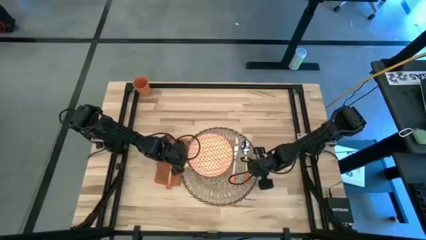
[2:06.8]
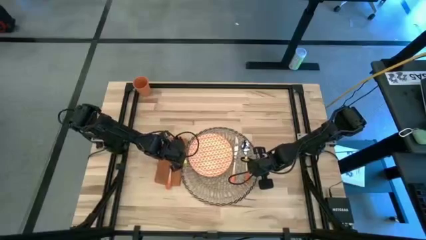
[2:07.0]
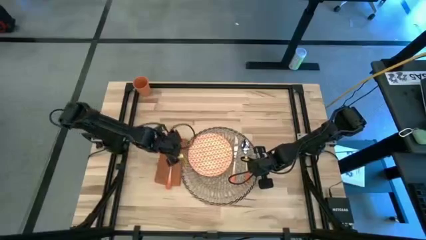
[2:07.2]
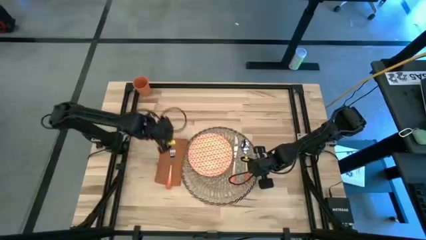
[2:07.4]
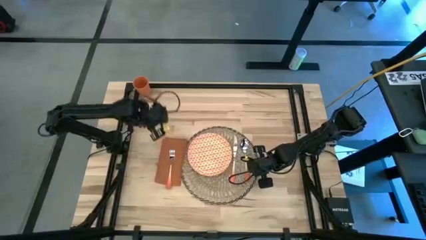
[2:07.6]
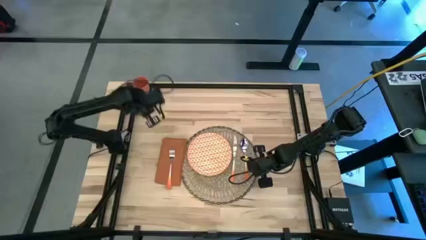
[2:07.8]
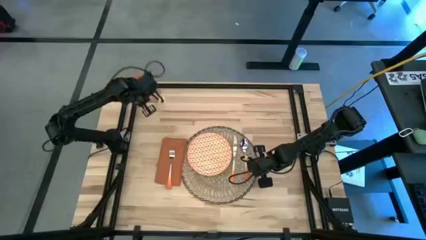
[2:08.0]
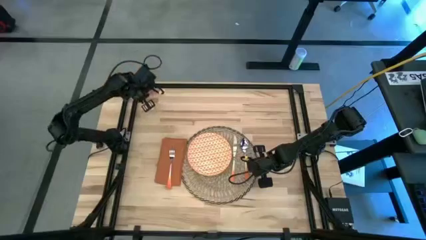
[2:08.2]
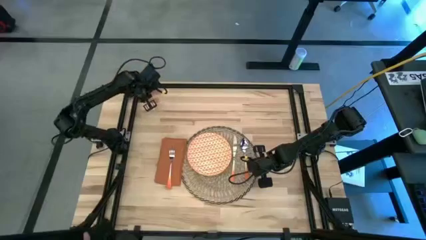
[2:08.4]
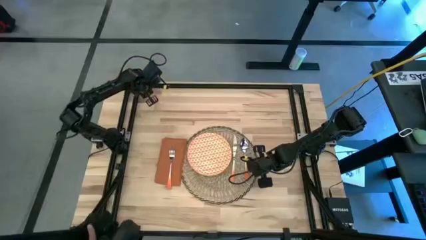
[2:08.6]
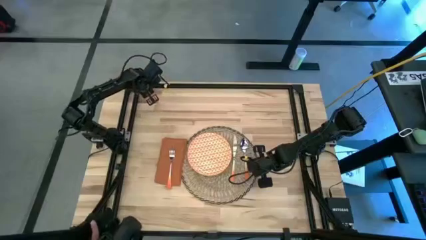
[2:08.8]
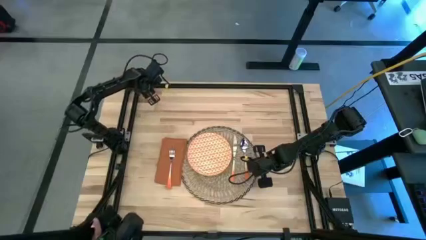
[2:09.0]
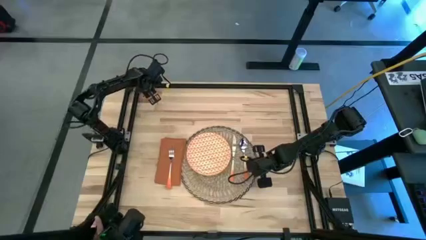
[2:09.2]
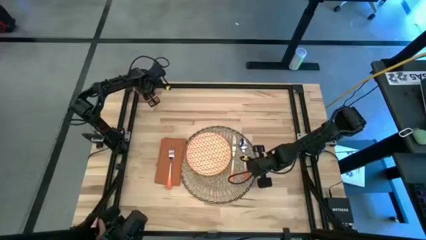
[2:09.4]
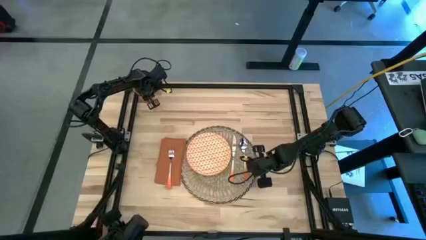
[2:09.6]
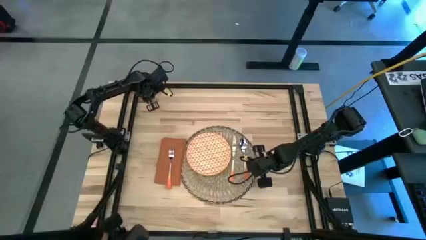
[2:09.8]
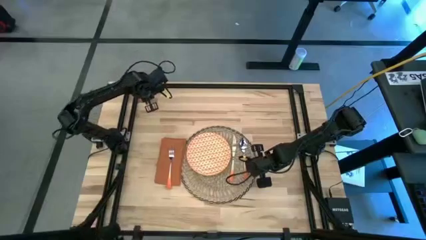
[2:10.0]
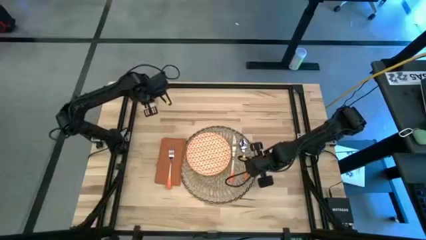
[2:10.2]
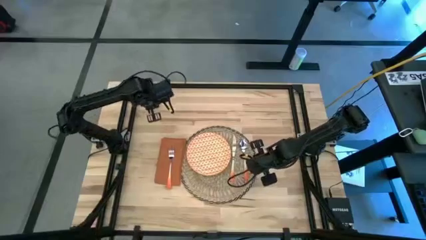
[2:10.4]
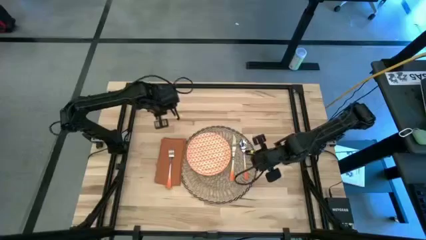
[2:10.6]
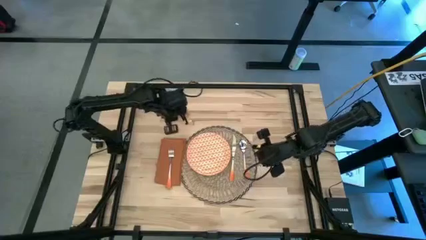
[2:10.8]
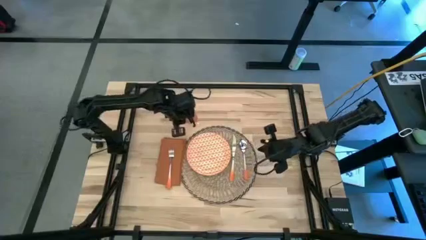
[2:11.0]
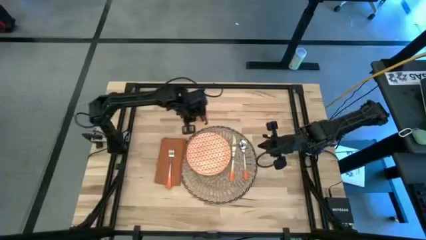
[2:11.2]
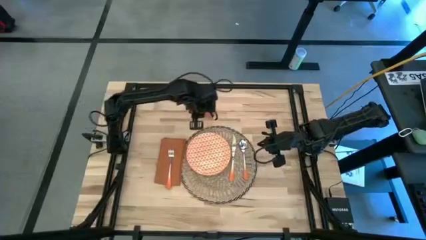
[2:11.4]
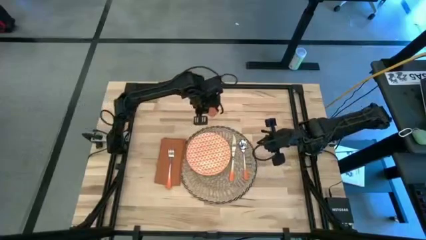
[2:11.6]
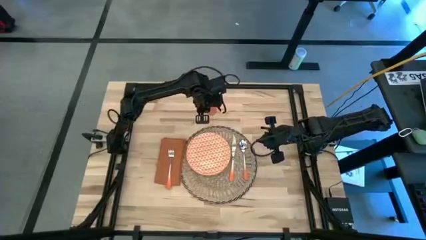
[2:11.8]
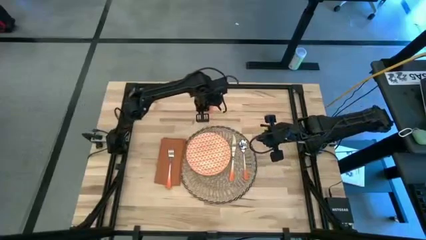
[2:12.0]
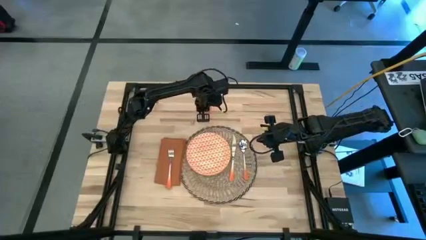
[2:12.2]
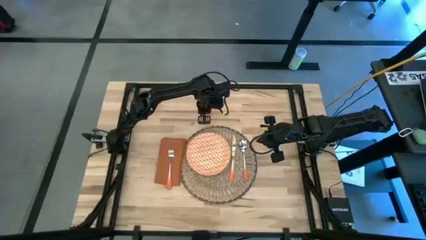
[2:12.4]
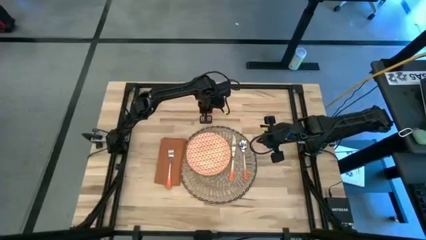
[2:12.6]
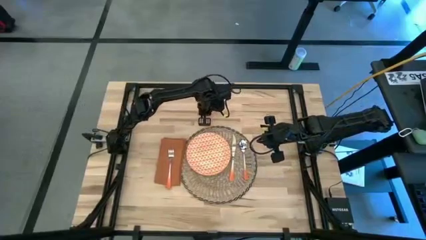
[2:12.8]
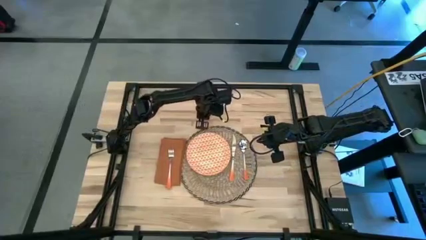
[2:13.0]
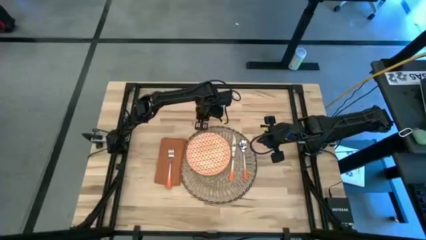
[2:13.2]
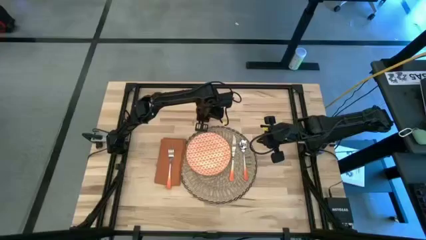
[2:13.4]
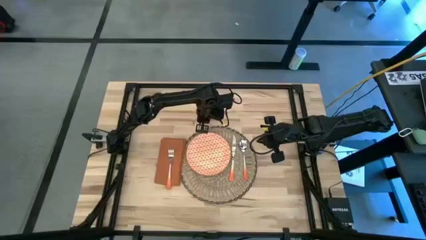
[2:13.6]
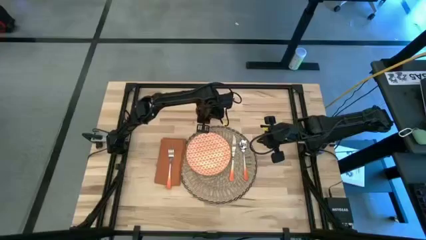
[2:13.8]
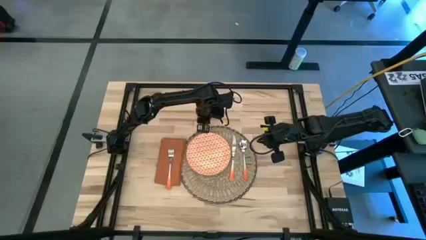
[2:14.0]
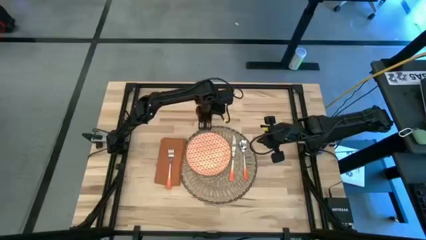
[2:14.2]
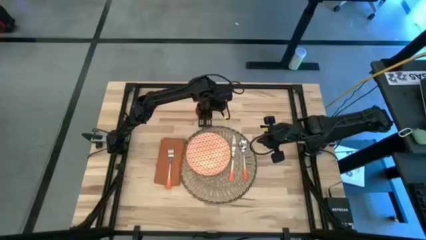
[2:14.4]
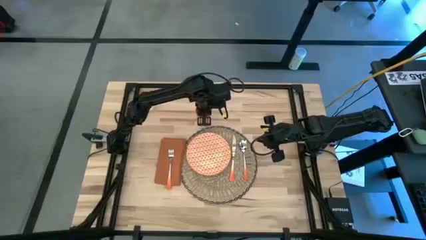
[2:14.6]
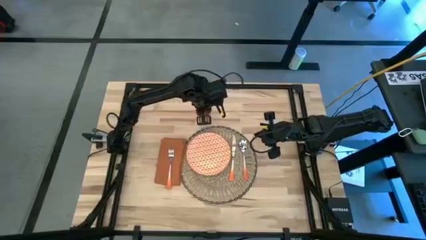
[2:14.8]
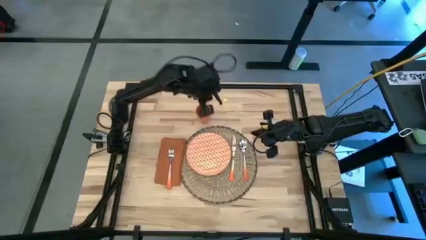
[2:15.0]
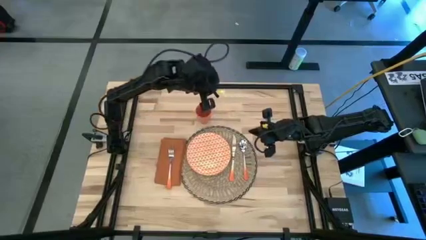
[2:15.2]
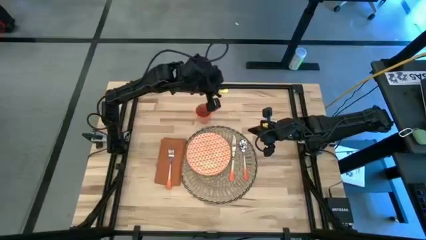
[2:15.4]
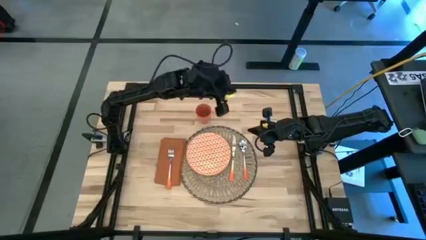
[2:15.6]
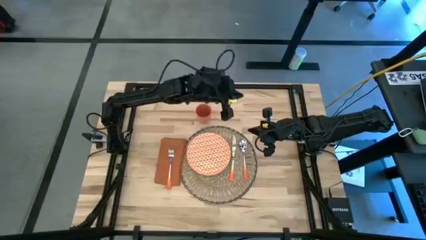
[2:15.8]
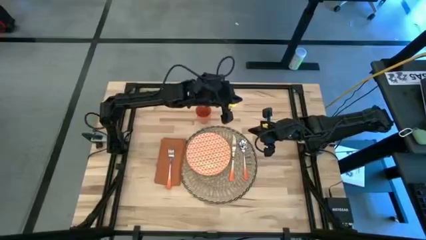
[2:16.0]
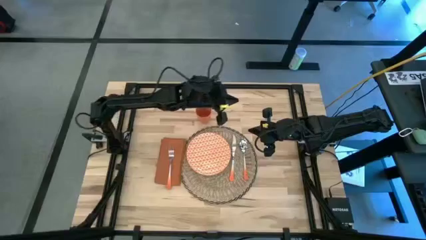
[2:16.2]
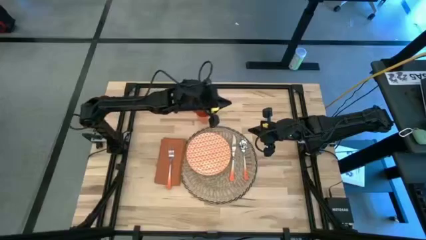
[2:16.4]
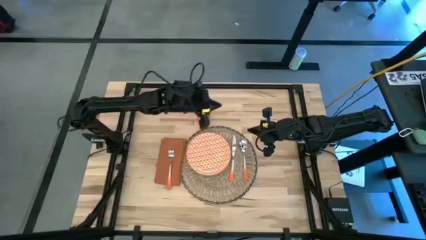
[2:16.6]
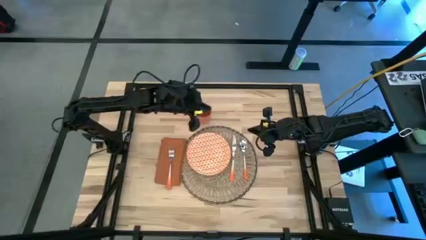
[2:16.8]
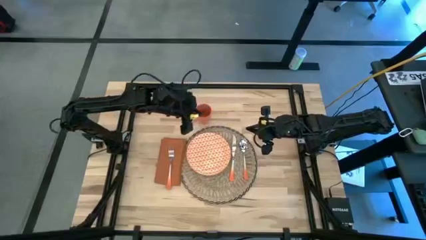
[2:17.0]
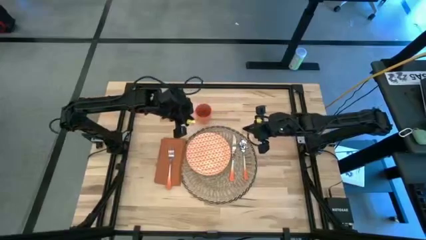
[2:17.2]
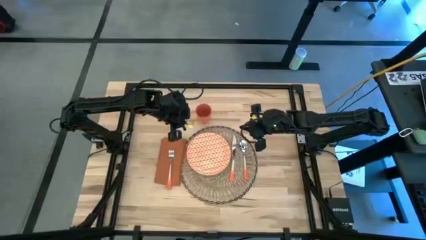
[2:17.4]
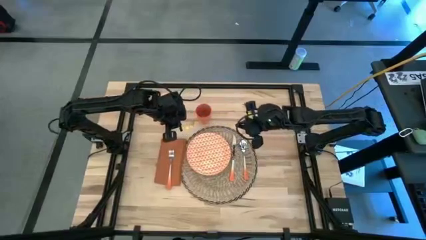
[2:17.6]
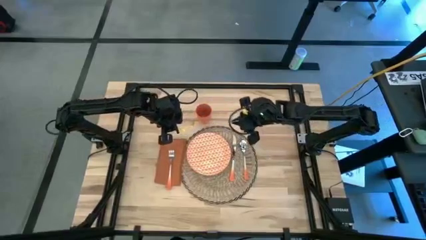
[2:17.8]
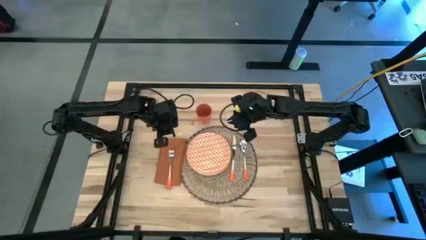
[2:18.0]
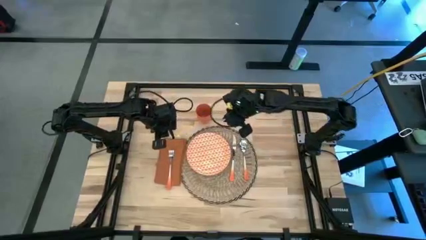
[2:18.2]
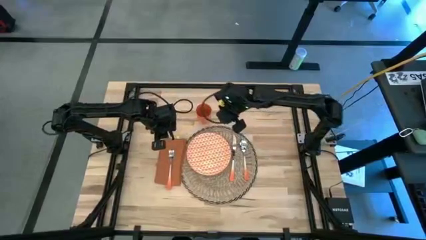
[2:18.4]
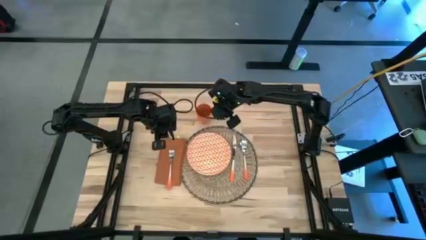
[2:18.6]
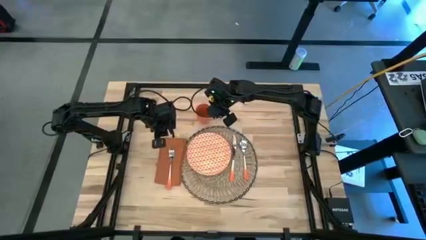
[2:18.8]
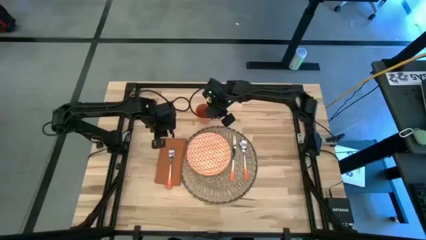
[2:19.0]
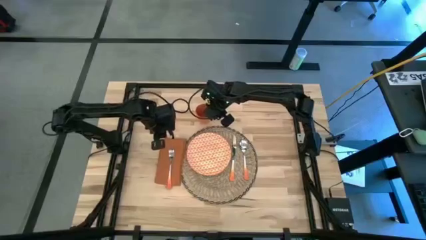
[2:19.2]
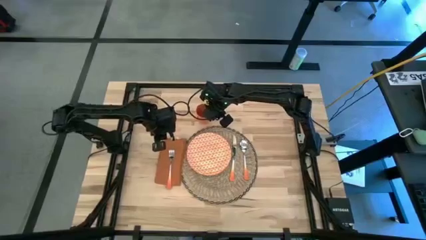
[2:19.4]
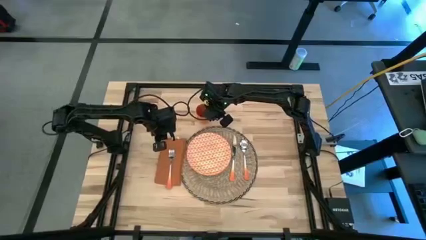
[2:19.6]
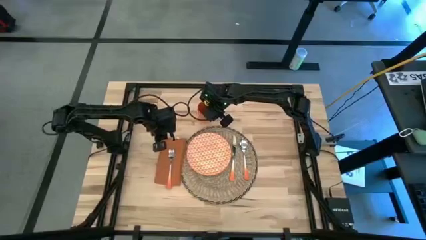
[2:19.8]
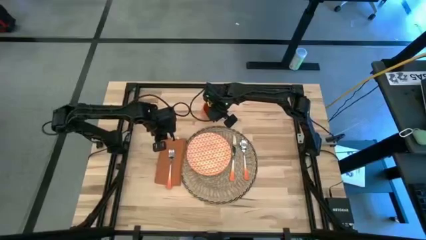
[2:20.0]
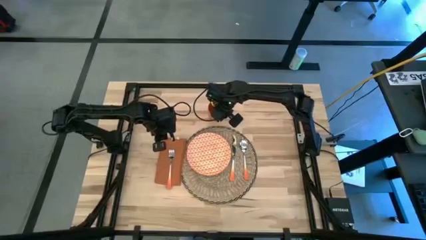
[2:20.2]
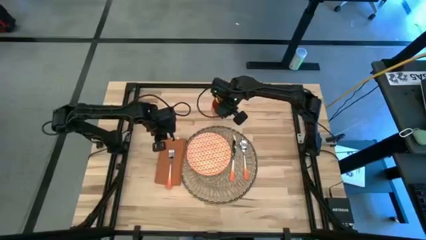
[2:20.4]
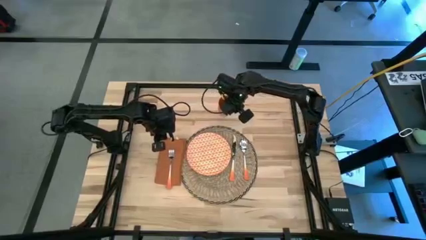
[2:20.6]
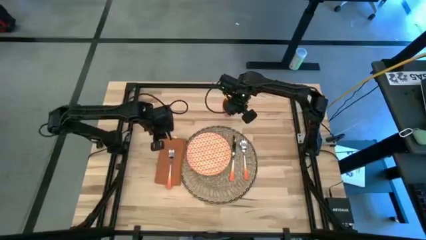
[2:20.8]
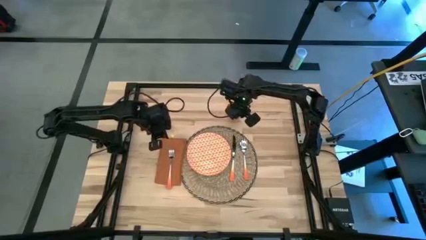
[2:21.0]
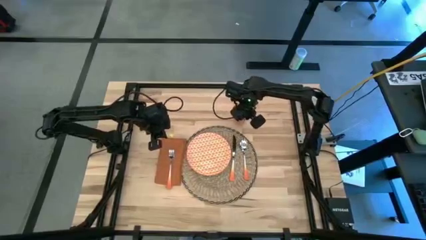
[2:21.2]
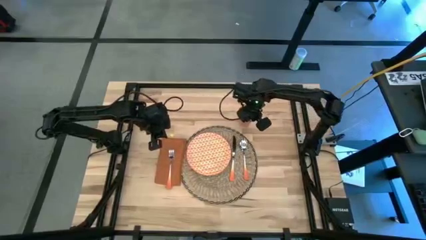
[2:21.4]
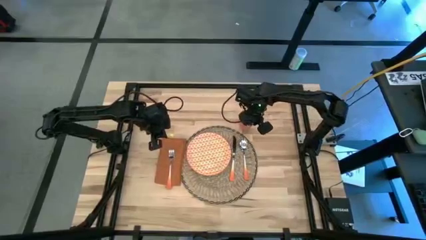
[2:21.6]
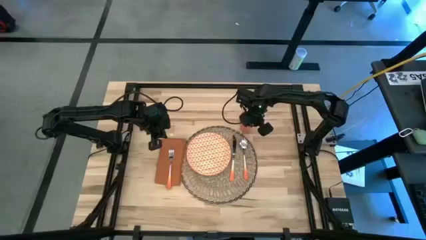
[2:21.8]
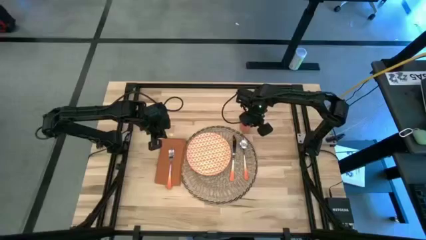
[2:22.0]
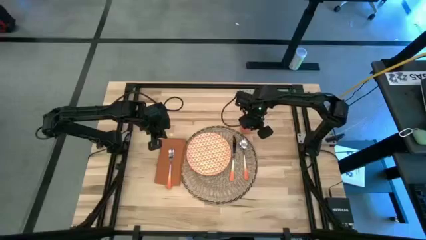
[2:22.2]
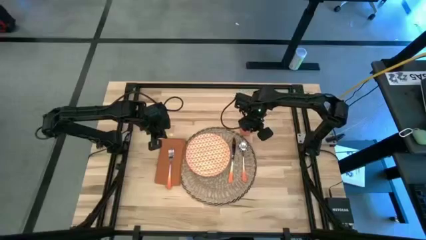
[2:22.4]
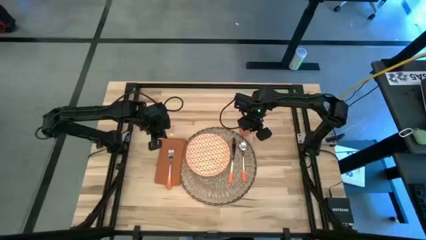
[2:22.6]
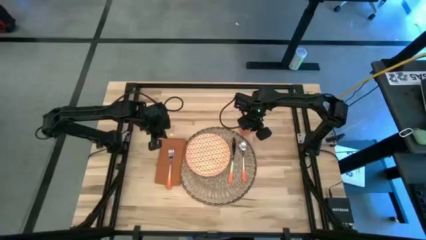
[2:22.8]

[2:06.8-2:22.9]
Task: Set table place
Move the orange cup to the top right of the brown table mat
